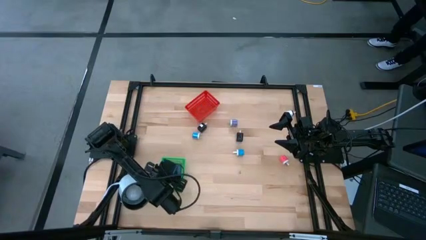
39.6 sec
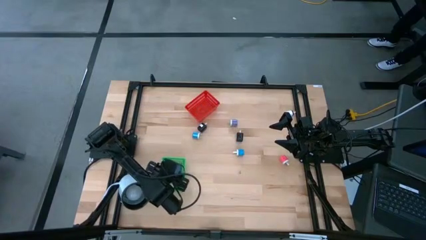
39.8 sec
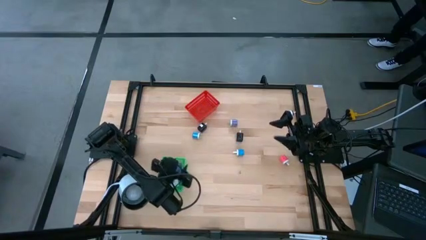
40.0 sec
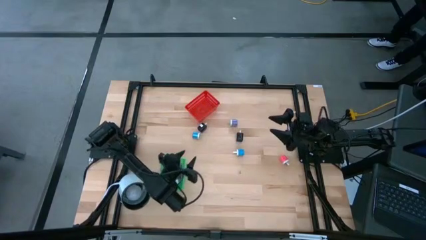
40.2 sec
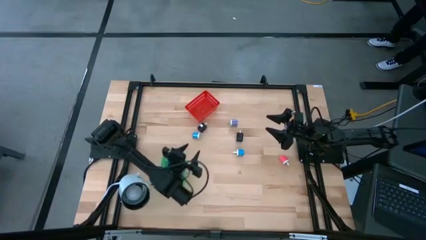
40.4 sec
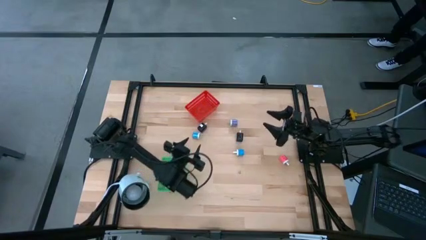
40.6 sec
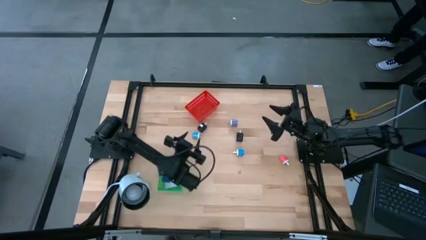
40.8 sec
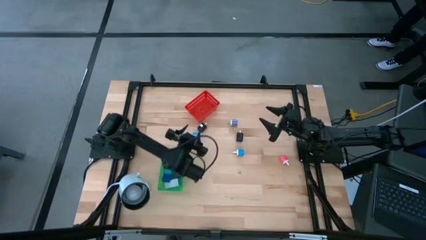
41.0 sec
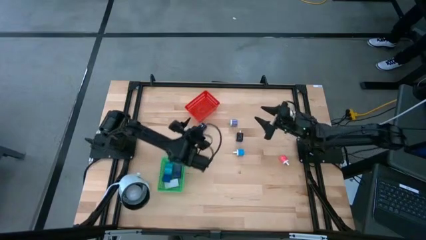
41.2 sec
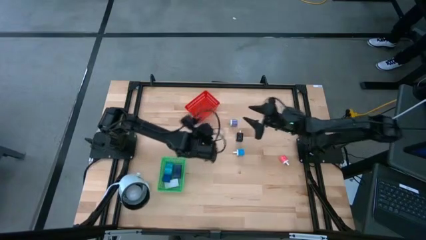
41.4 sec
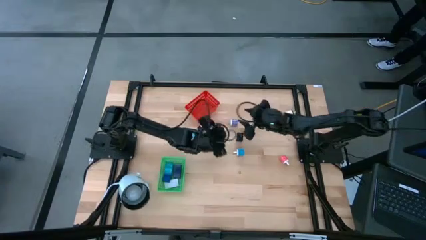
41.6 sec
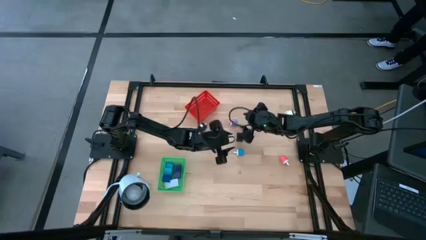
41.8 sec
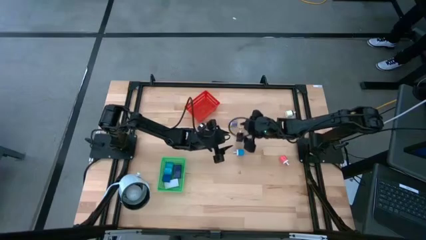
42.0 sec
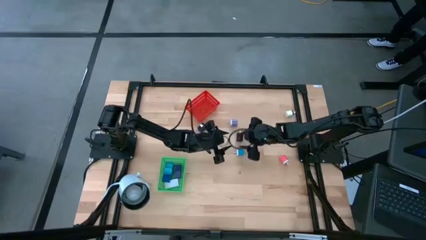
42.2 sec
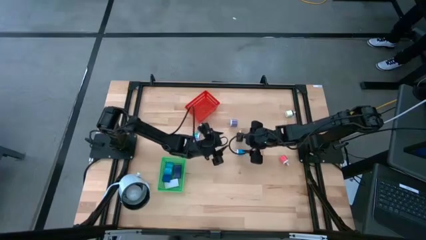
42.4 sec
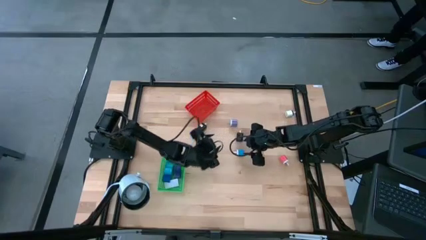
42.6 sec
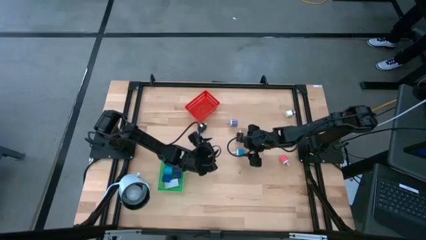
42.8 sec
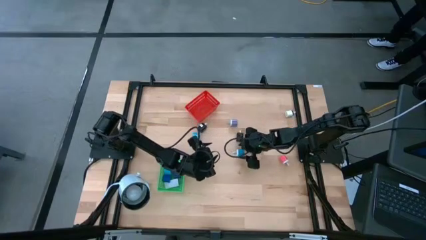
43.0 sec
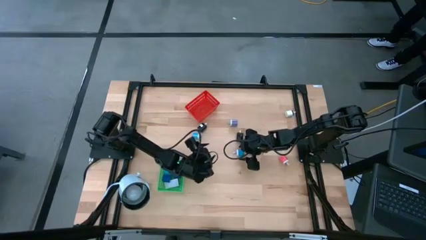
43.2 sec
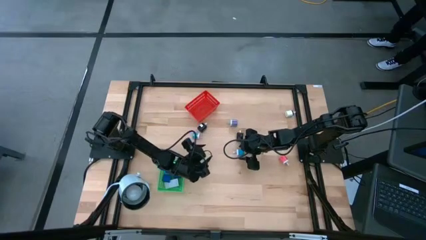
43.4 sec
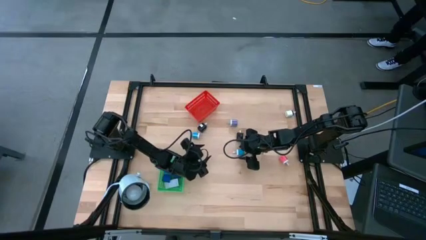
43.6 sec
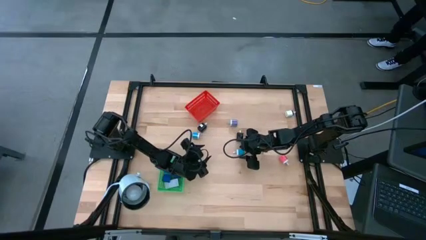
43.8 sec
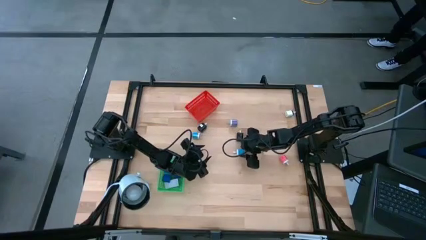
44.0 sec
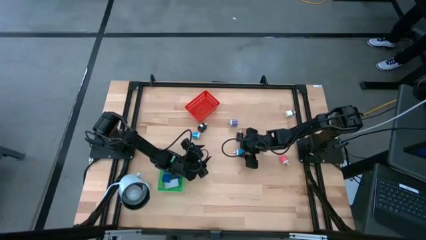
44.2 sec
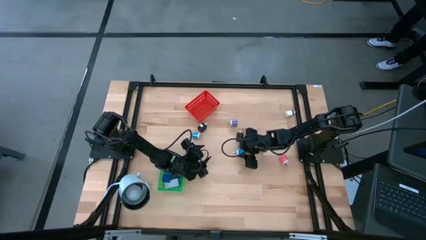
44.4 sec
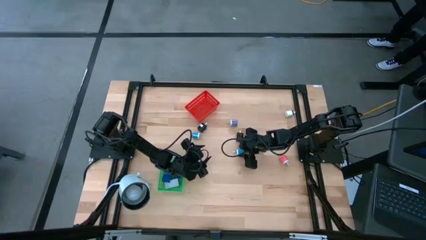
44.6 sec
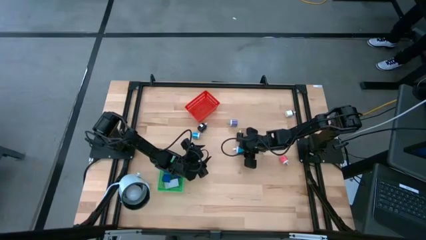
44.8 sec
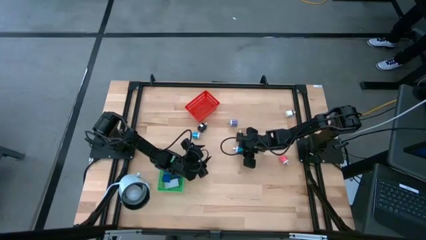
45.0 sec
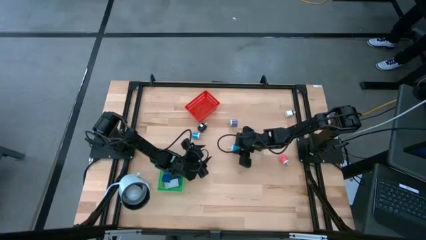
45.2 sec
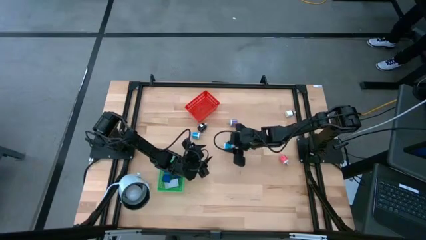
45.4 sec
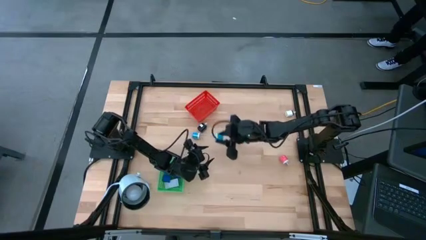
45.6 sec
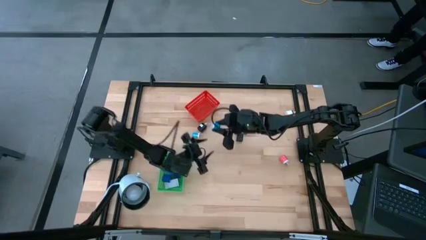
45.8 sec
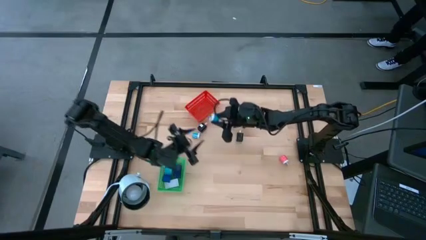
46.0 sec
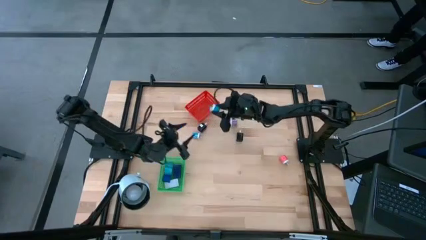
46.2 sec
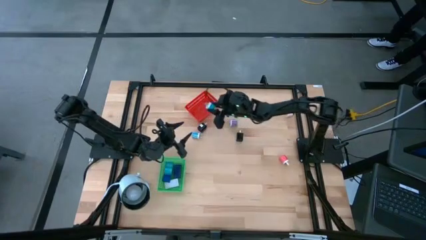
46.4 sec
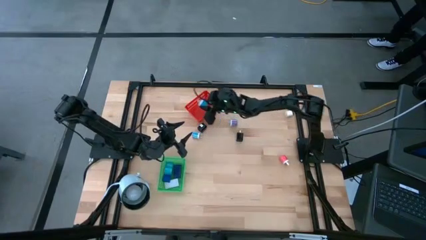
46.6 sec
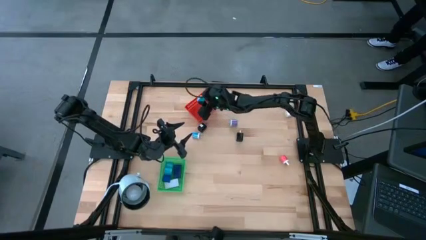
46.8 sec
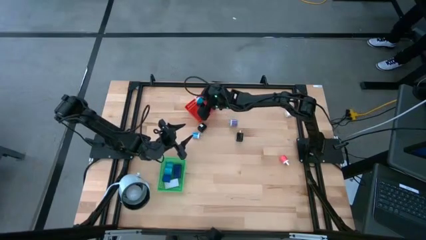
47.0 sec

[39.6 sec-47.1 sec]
Task: Pick & Place Office items
Put the bottom blue charger adapter into the red bin

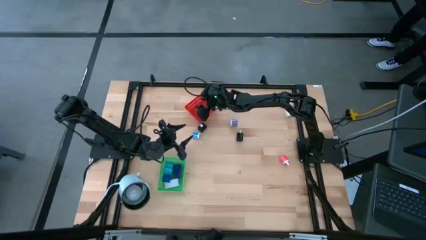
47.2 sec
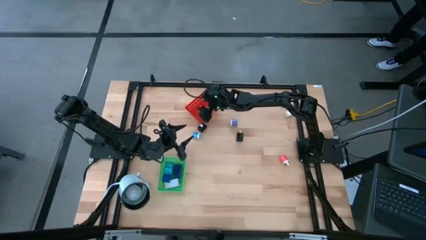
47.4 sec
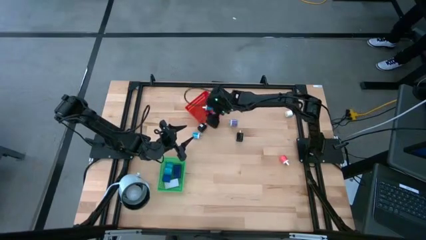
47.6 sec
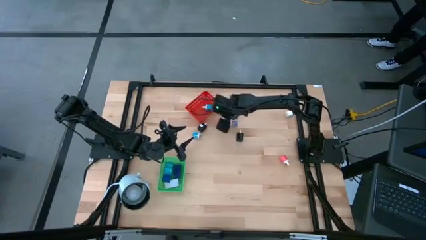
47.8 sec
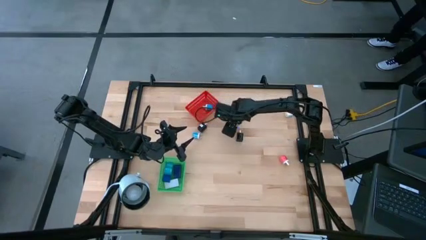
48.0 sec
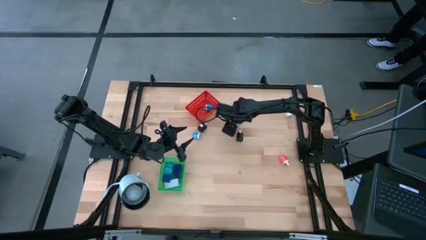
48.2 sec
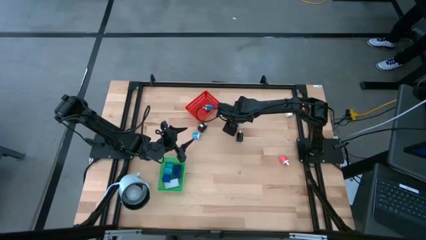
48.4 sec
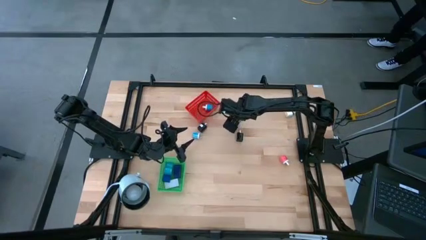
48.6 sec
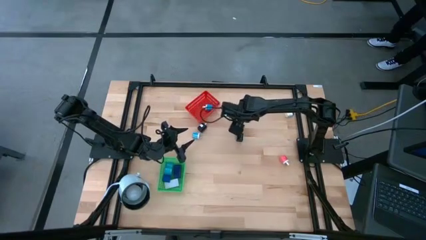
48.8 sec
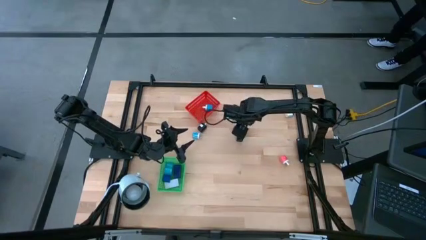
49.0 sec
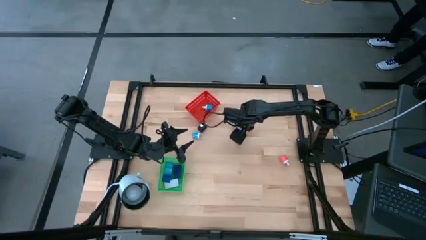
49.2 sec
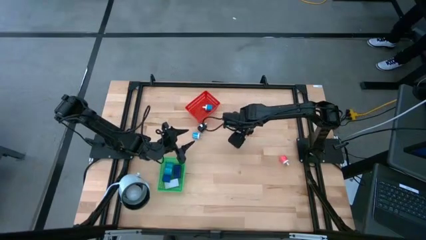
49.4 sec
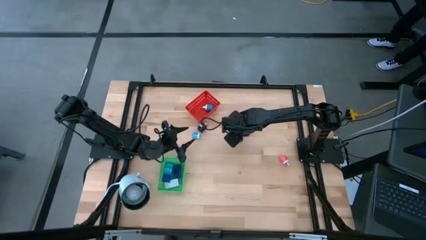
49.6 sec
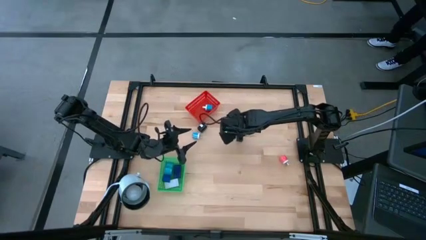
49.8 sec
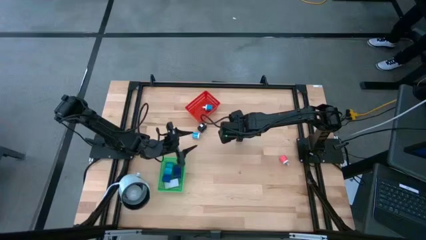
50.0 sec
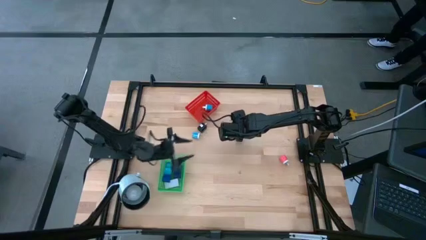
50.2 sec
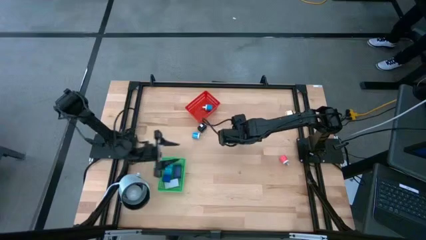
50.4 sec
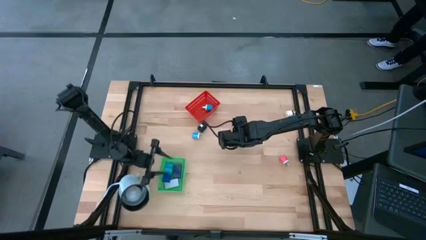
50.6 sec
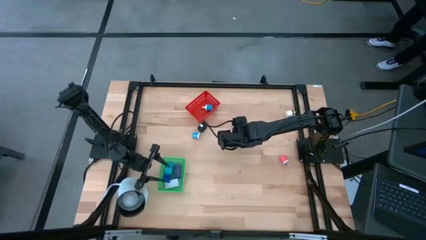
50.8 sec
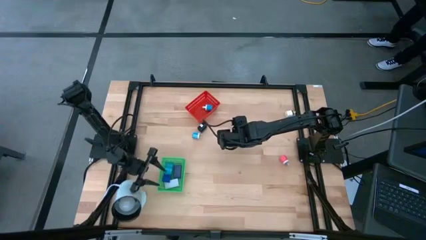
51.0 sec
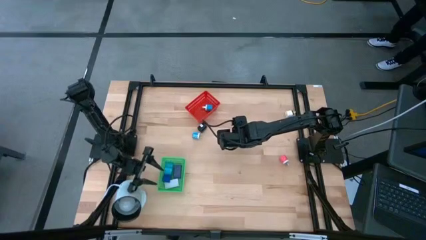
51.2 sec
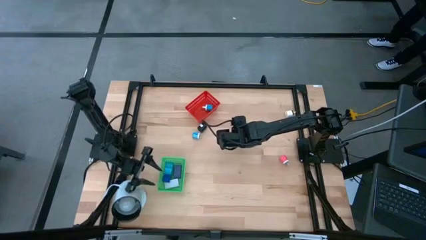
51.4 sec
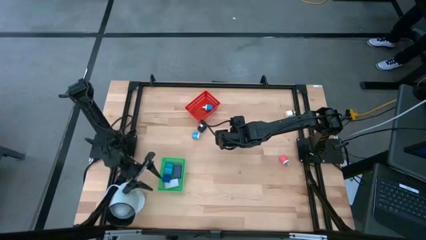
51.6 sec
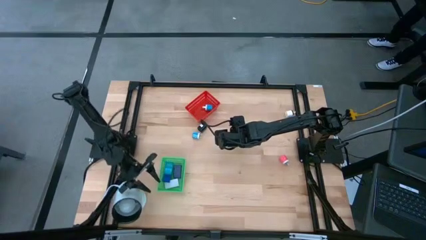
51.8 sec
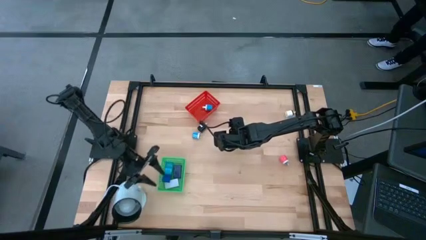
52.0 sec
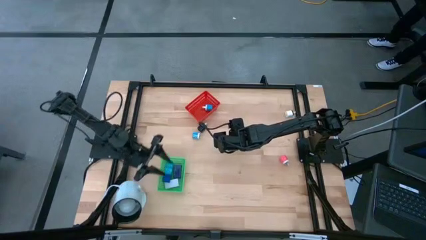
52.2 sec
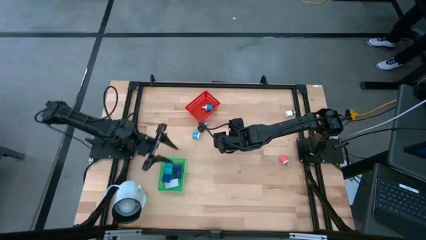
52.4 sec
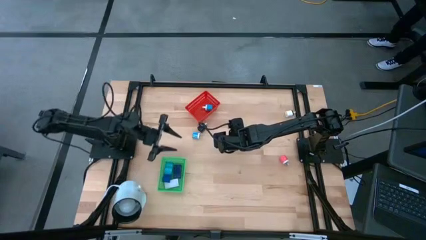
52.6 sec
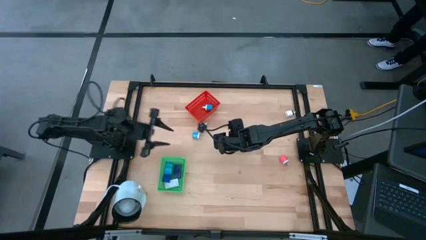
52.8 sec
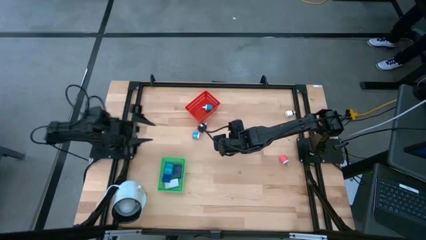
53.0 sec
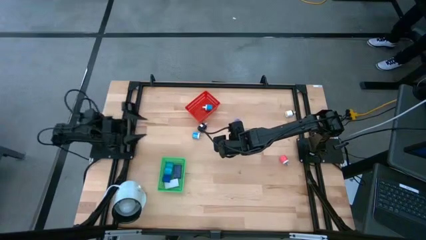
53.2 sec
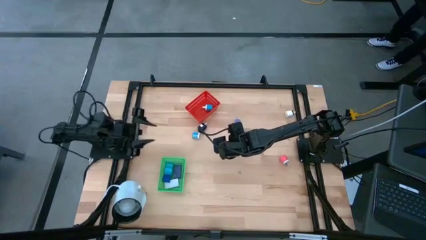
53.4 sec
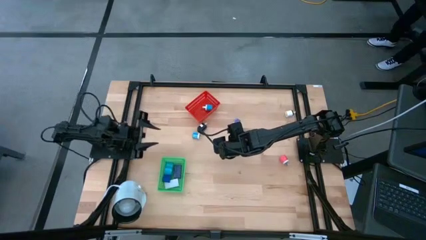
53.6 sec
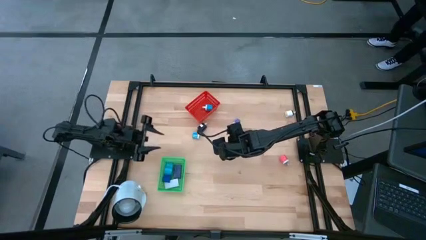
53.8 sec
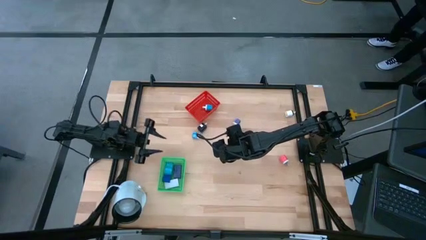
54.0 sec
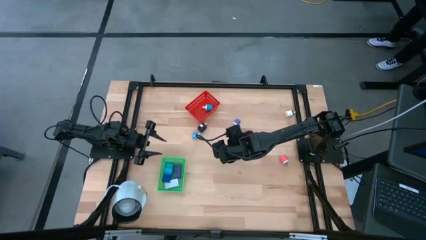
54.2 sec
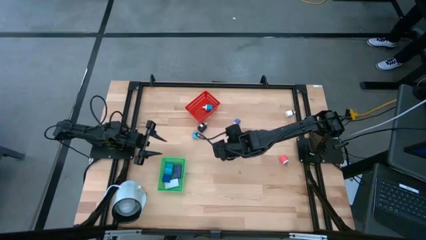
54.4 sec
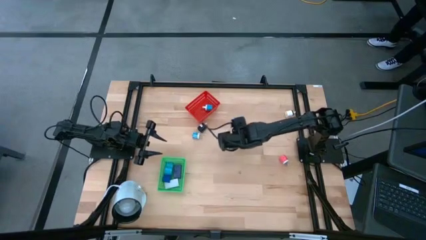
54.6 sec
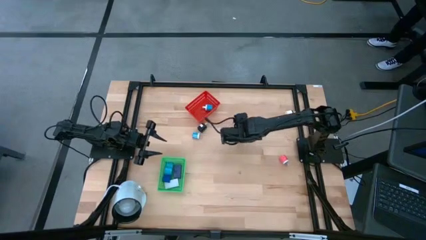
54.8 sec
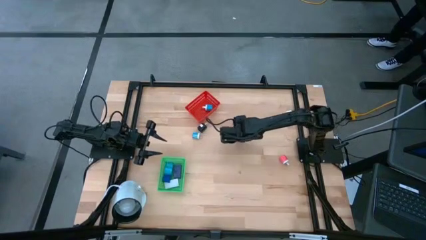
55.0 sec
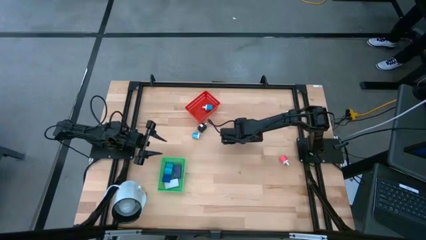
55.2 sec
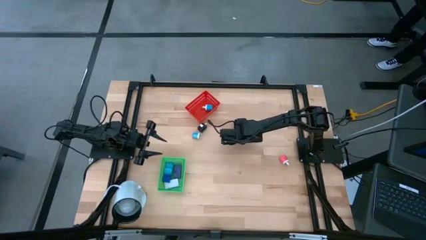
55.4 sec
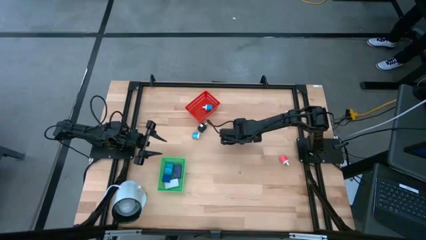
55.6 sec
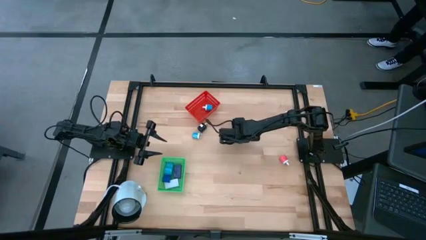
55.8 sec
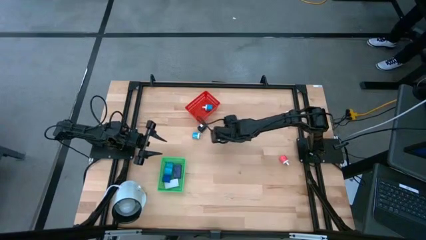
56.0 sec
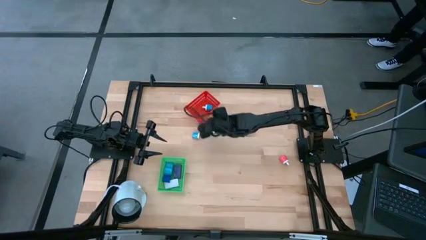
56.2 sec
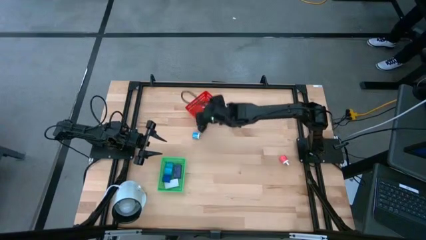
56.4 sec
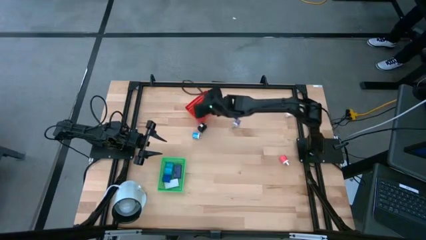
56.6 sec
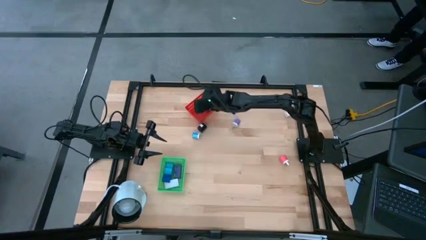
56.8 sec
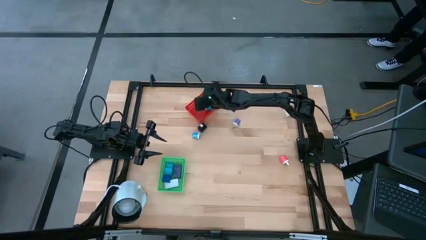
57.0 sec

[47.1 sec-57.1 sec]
Put the right black charger adapter into the red bin
